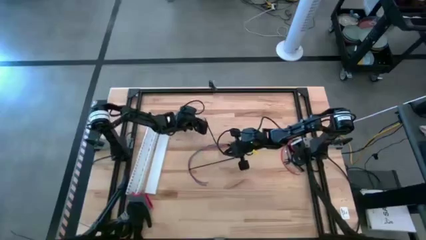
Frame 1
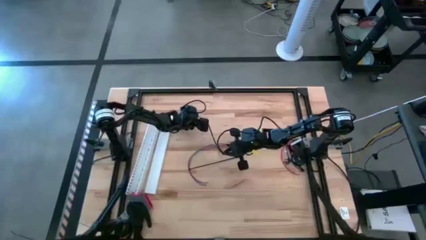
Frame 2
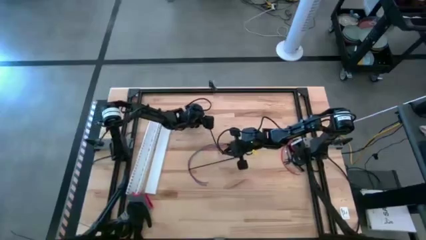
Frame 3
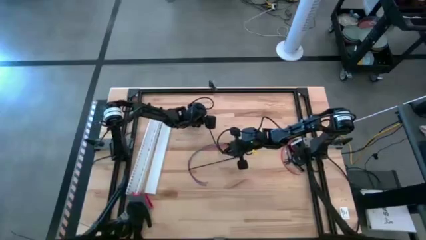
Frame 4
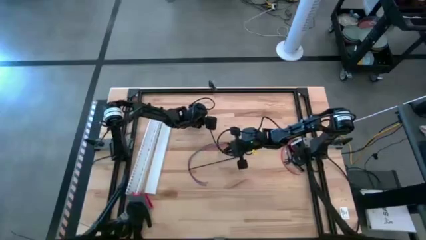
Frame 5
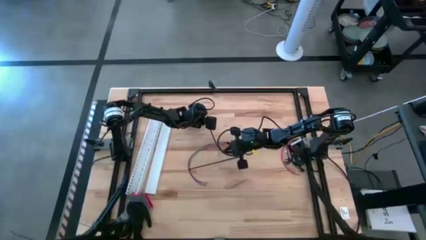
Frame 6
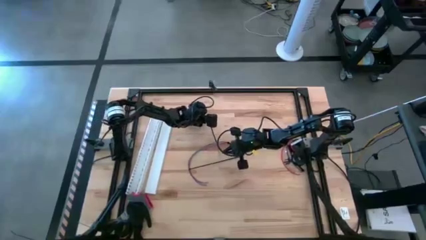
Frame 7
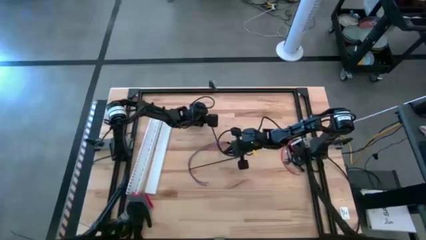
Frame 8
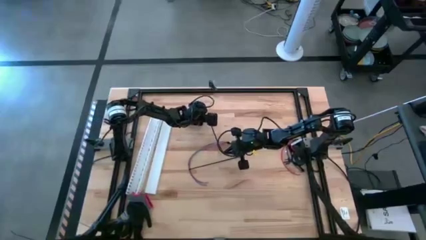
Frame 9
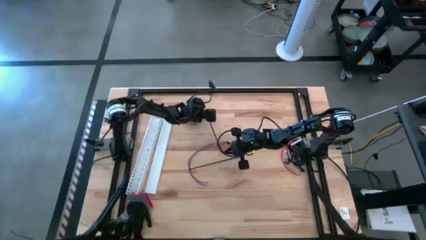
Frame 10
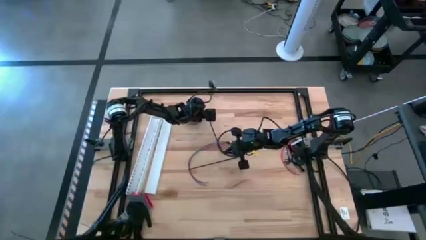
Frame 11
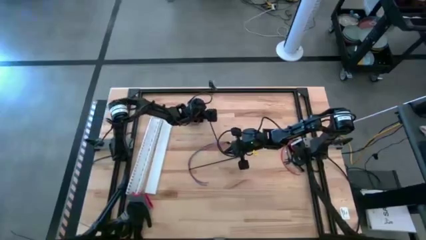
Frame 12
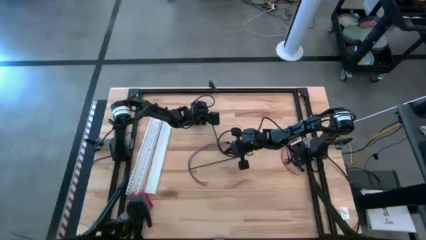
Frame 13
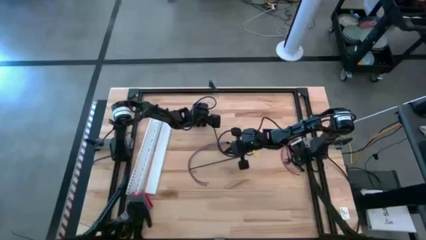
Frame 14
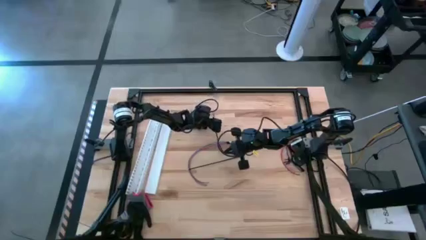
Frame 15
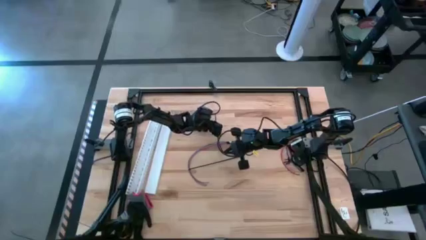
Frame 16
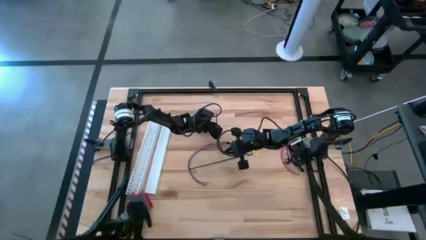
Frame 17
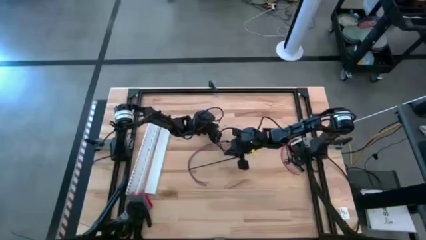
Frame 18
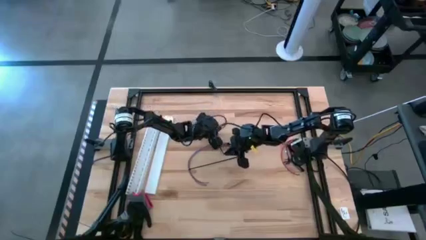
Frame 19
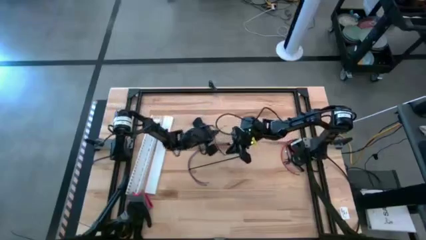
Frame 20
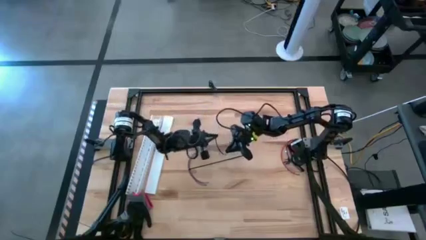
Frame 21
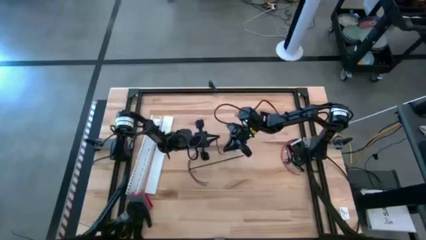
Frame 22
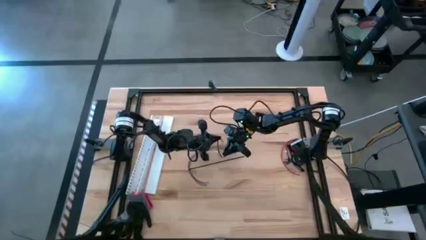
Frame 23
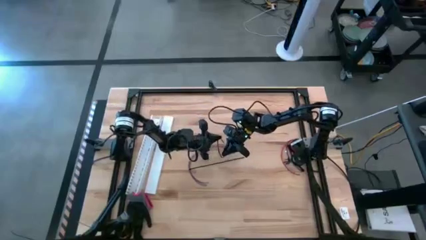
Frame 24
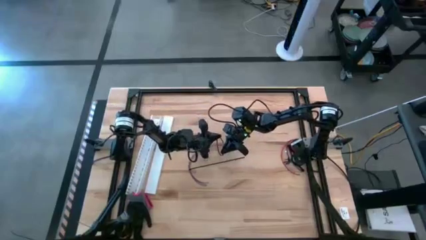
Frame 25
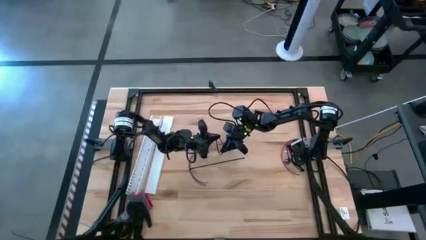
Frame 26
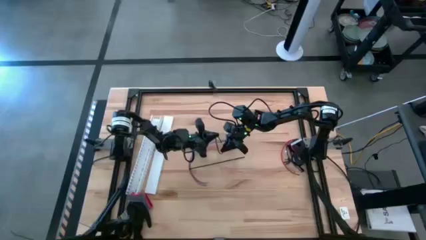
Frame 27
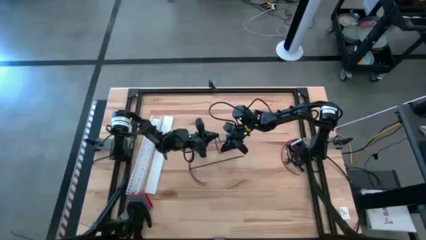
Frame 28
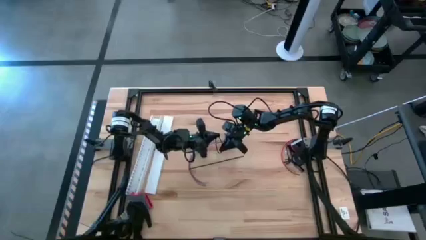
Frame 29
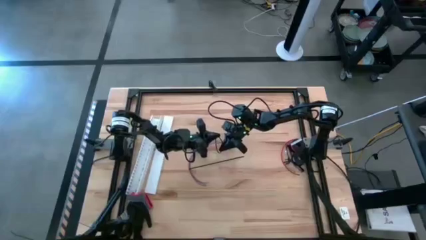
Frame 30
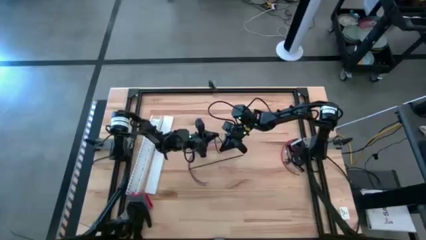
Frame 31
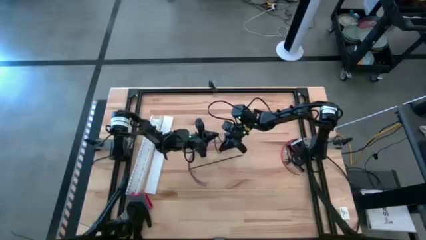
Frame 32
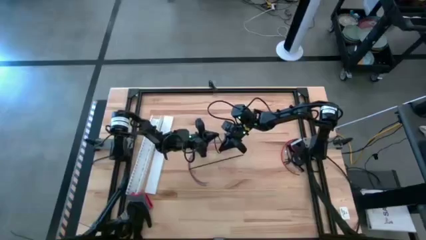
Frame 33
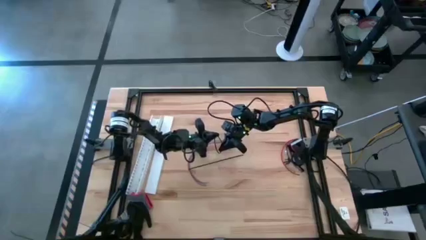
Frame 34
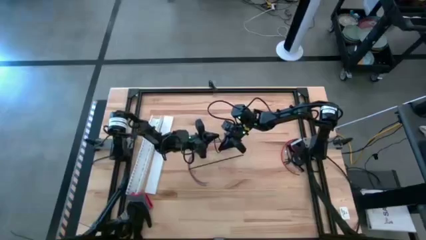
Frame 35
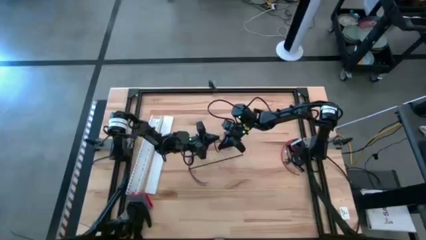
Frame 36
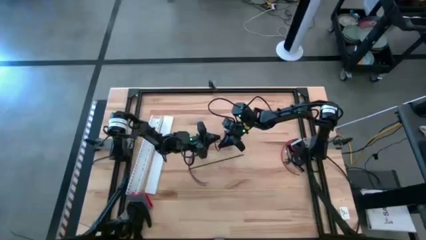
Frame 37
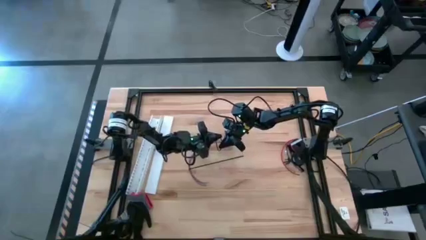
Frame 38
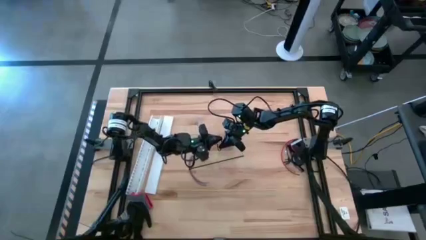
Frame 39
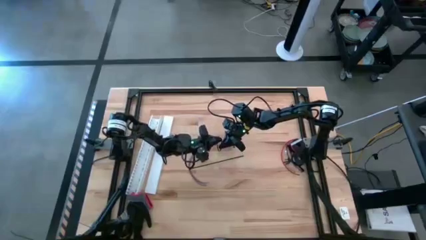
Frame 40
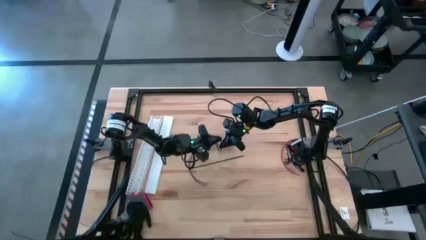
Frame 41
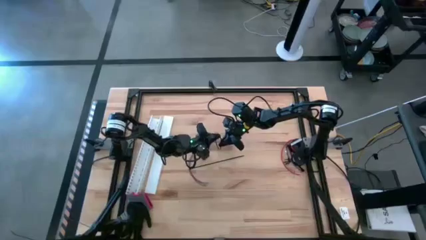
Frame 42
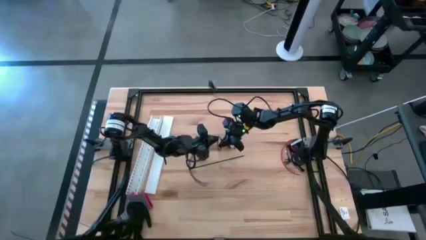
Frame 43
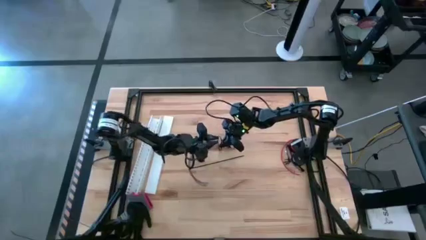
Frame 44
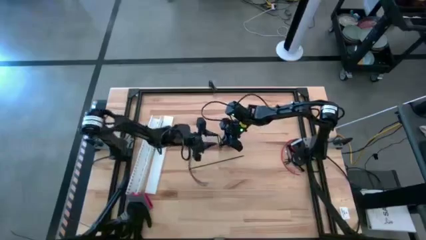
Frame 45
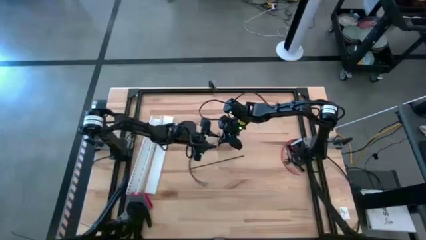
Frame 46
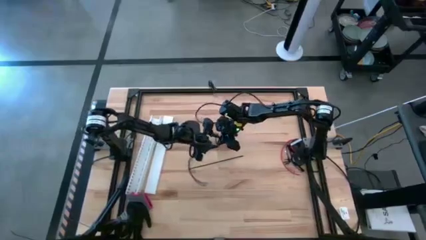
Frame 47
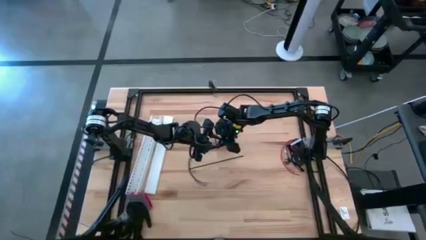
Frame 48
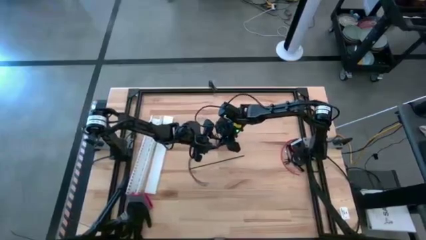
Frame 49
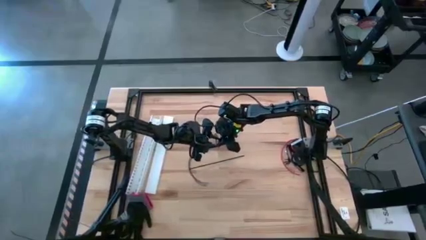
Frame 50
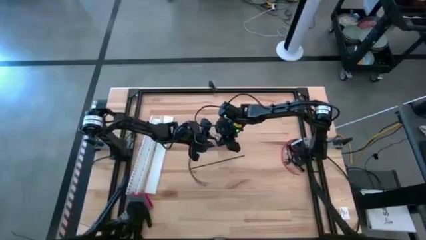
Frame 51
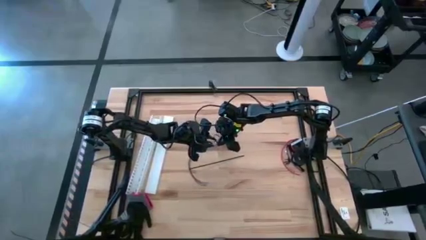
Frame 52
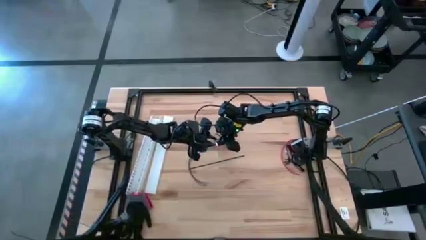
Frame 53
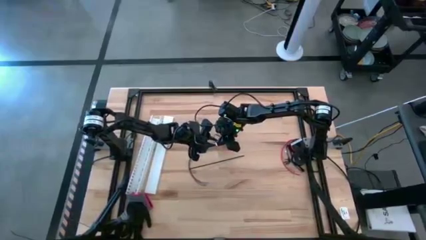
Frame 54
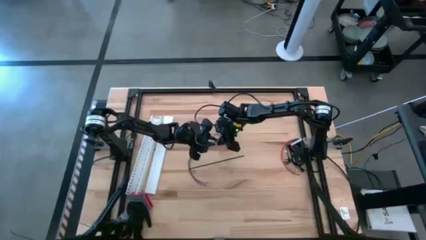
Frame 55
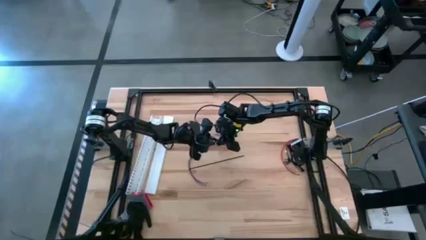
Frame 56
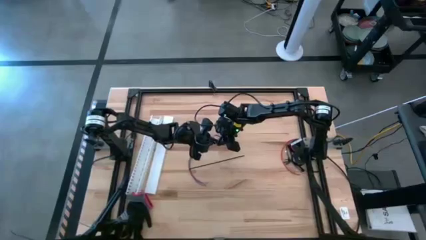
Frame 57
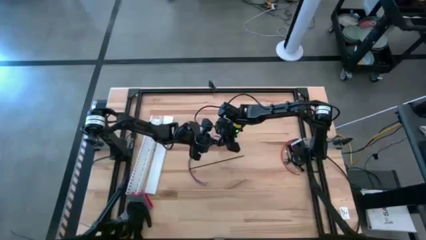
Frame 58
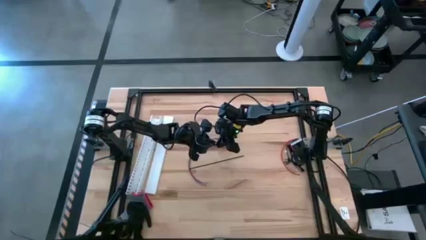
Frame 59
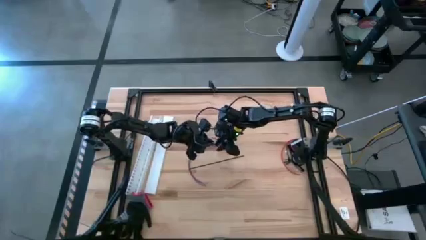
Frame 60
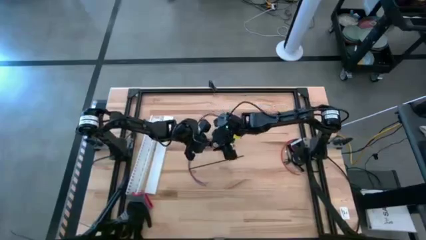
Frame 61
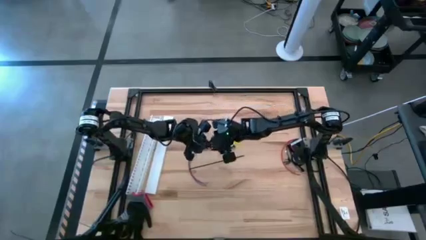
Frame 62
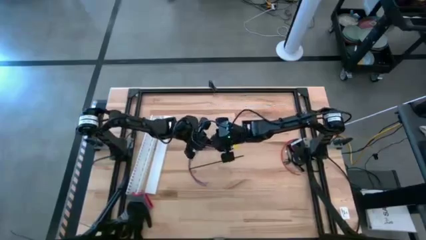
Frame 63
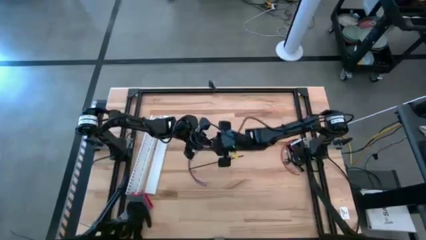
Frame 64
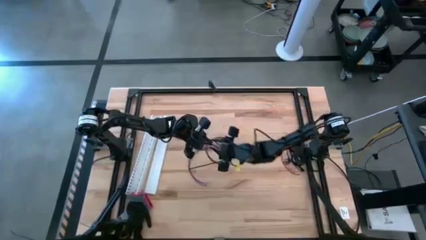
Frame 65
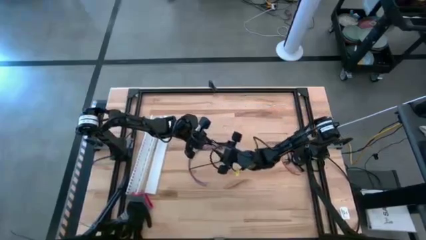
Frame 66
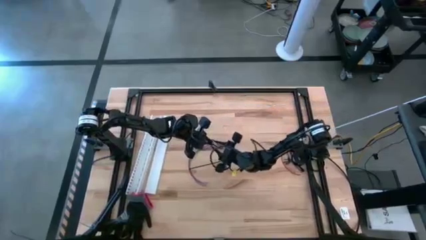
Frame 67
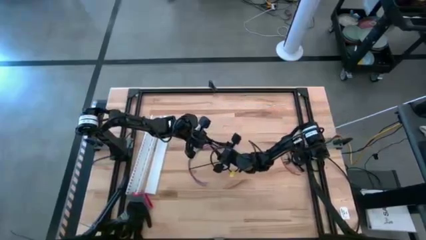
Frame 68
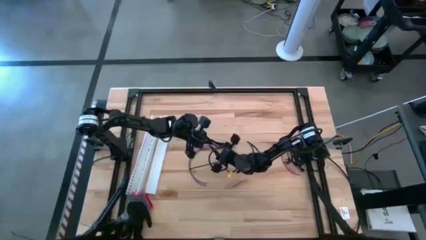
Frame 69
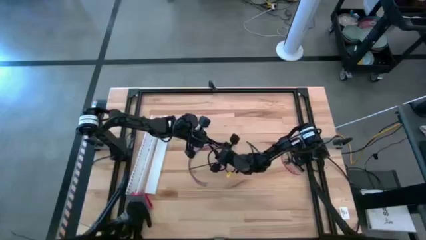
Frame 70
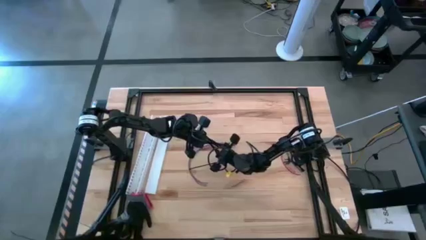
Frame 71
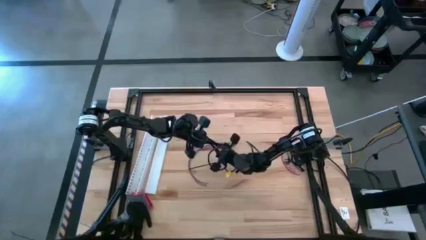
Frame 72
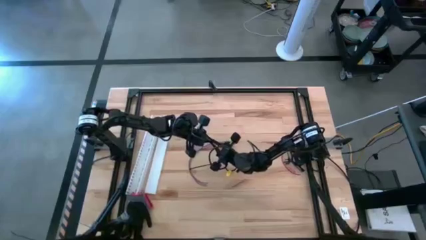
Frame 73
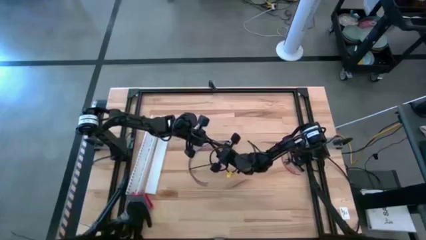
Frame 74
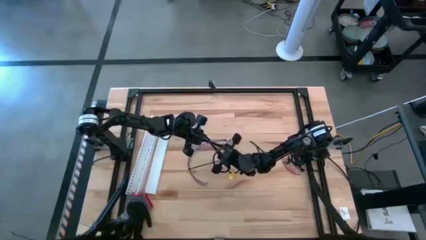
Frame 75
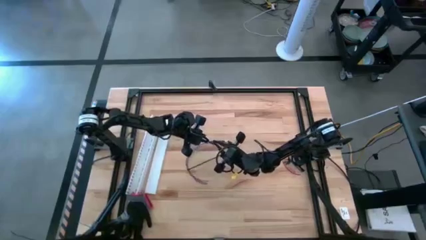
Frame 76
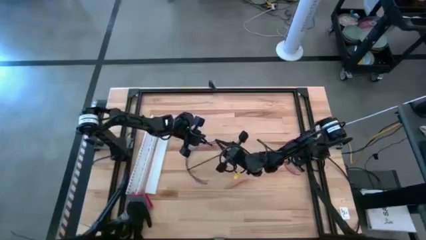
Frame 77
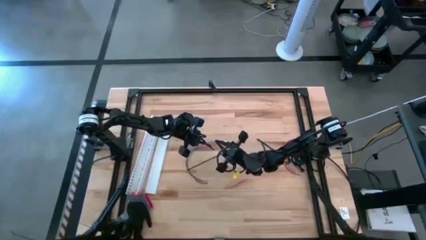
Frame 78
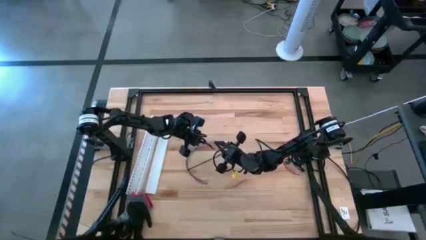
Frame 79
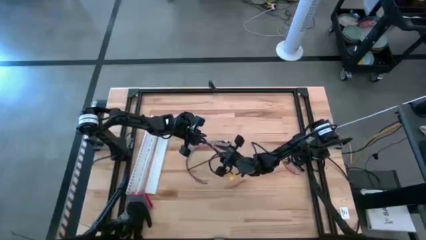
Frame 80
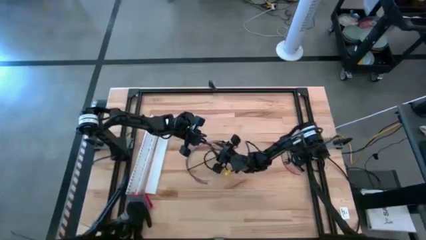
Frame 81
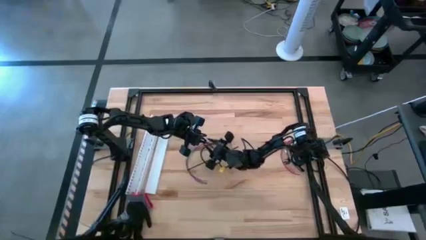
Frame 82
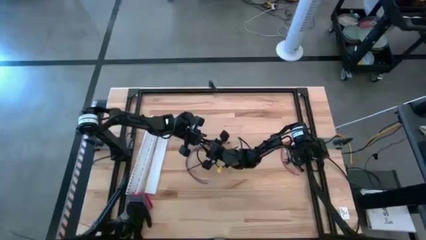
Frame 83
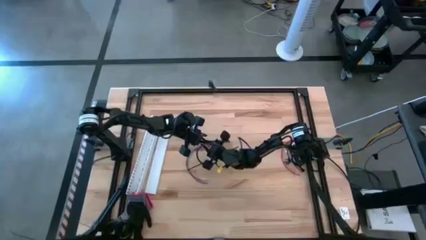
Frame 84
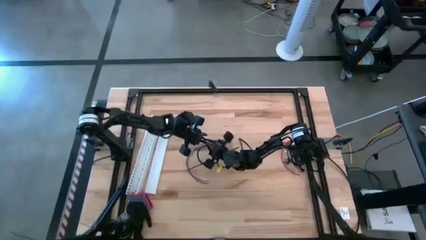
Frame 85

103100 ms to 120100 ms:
Task: Ziptie cables
Wrap the cable wires using black ziptie
